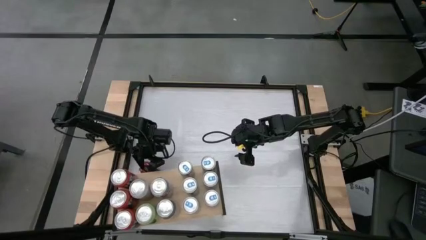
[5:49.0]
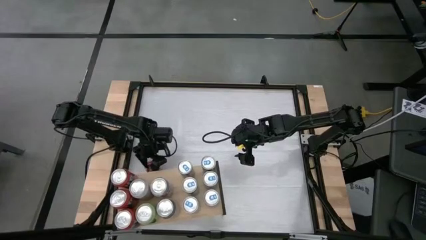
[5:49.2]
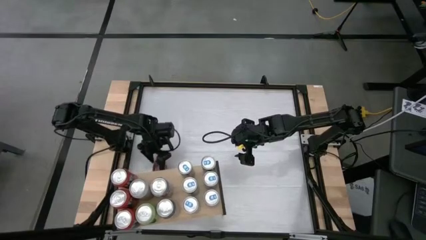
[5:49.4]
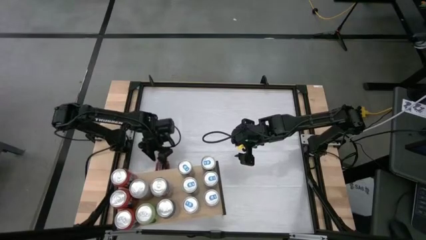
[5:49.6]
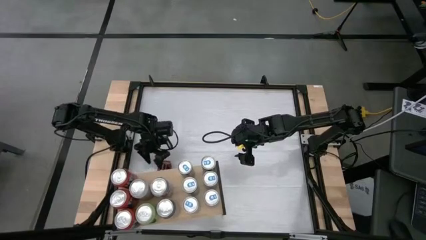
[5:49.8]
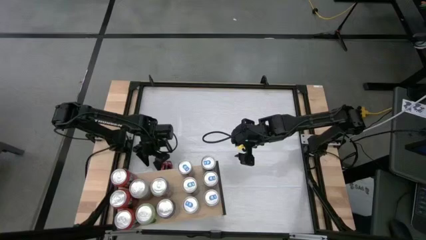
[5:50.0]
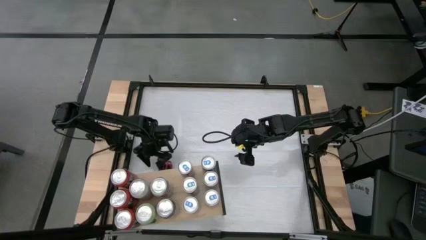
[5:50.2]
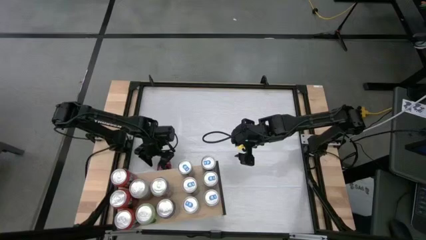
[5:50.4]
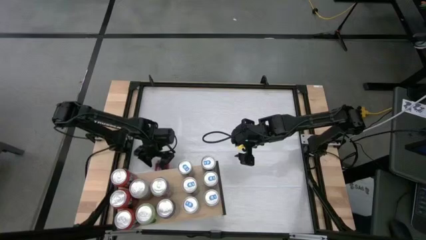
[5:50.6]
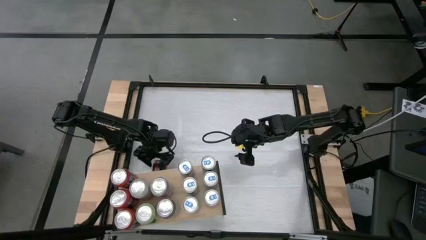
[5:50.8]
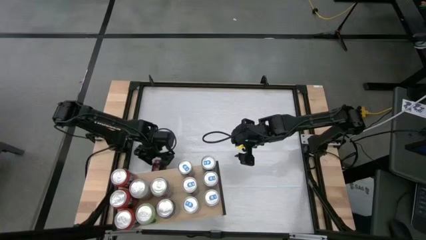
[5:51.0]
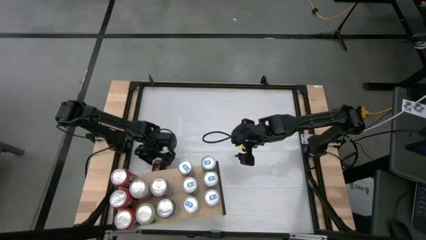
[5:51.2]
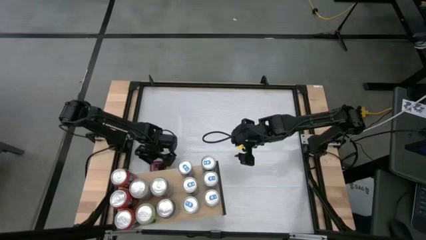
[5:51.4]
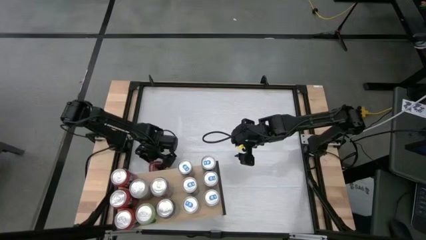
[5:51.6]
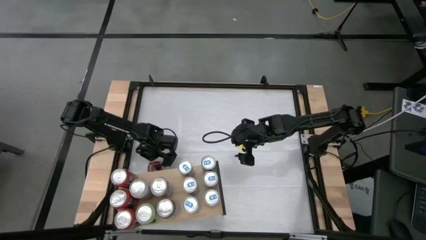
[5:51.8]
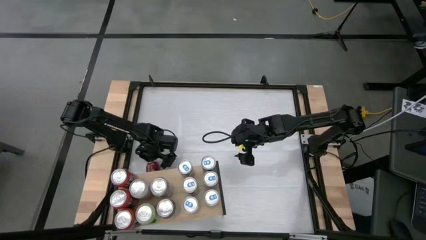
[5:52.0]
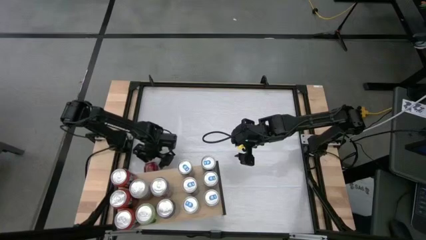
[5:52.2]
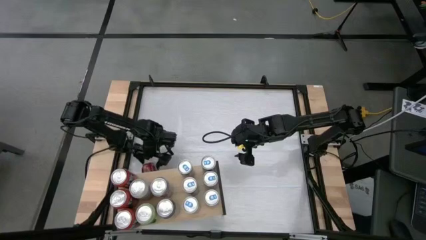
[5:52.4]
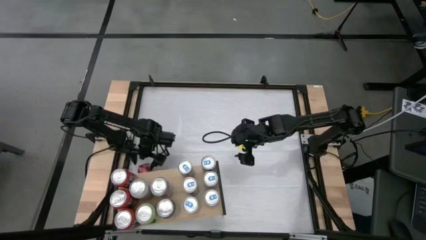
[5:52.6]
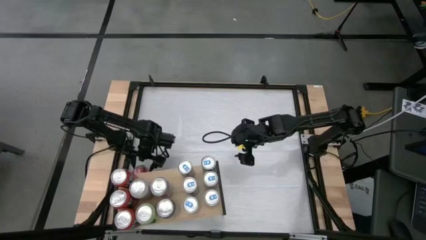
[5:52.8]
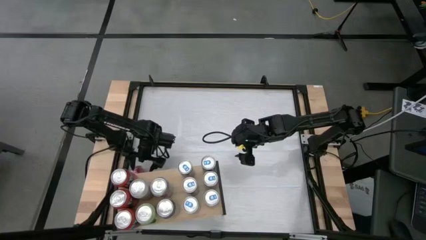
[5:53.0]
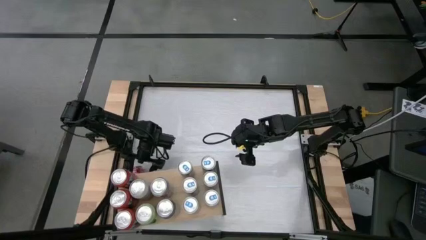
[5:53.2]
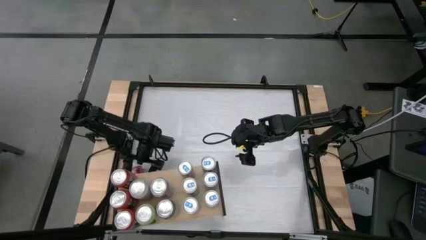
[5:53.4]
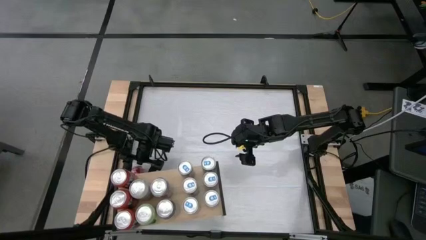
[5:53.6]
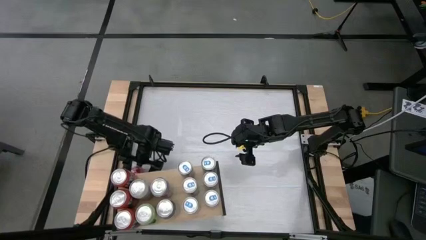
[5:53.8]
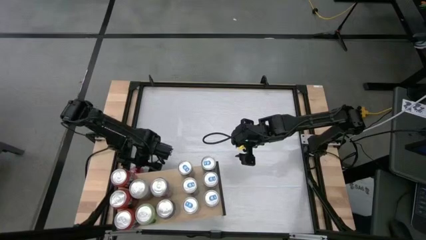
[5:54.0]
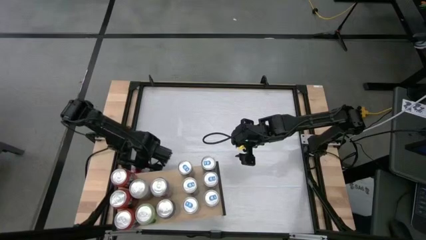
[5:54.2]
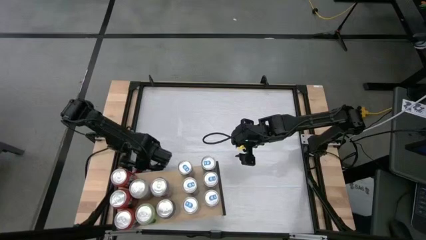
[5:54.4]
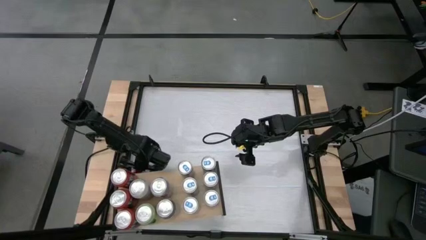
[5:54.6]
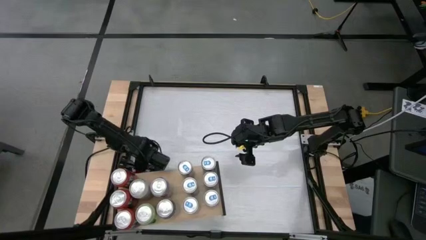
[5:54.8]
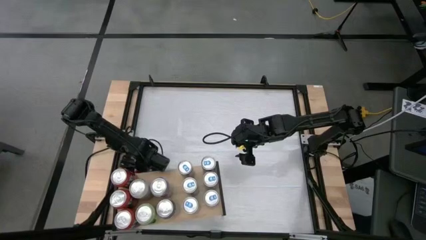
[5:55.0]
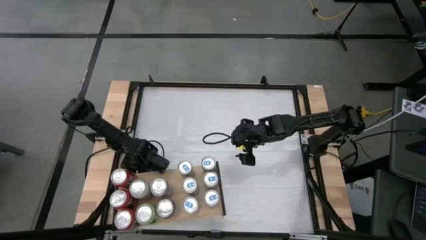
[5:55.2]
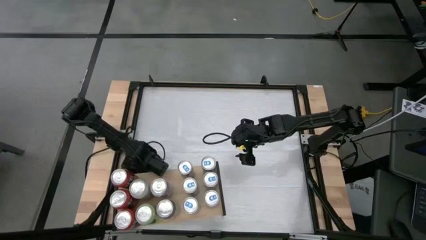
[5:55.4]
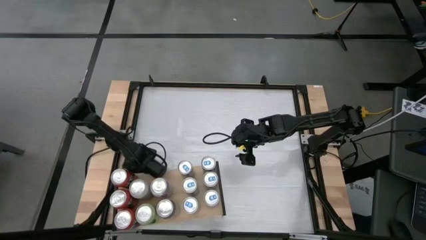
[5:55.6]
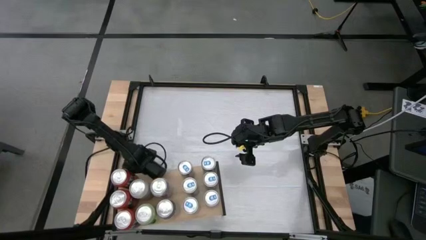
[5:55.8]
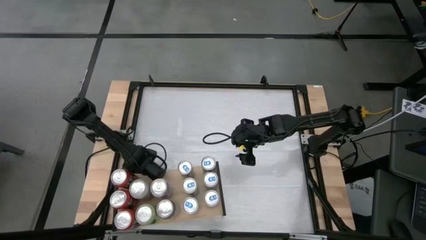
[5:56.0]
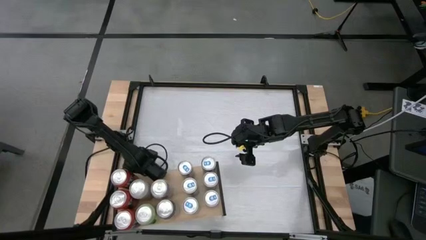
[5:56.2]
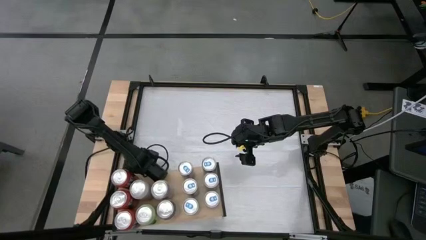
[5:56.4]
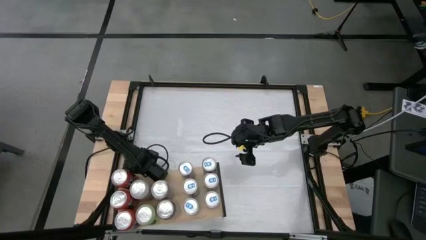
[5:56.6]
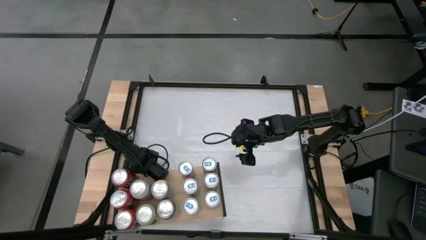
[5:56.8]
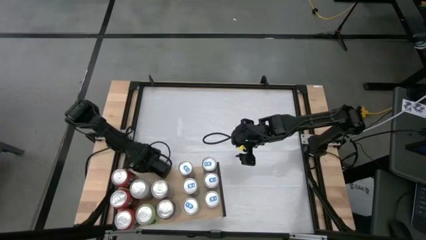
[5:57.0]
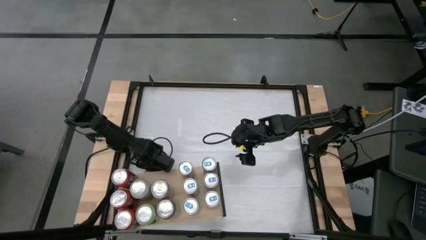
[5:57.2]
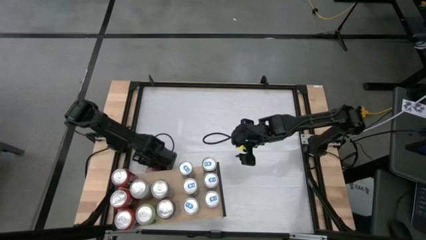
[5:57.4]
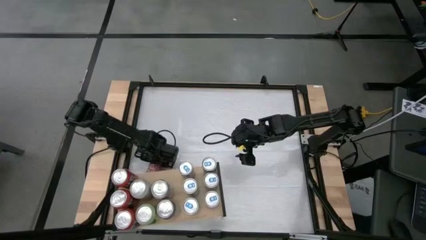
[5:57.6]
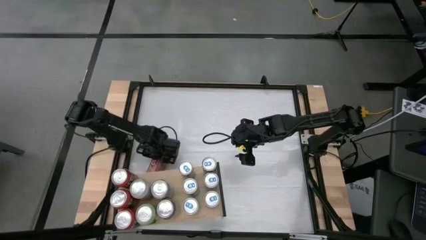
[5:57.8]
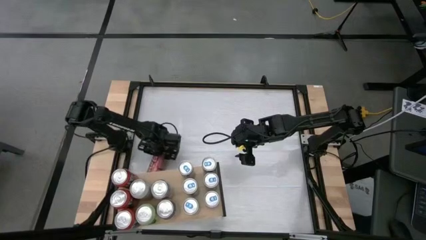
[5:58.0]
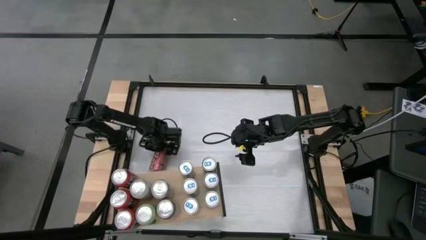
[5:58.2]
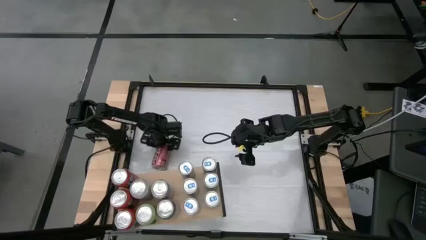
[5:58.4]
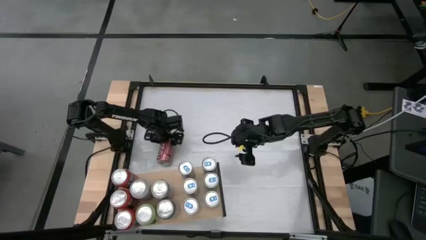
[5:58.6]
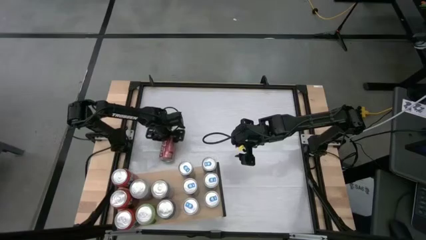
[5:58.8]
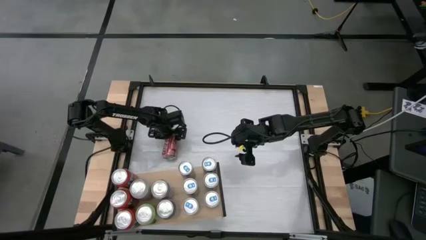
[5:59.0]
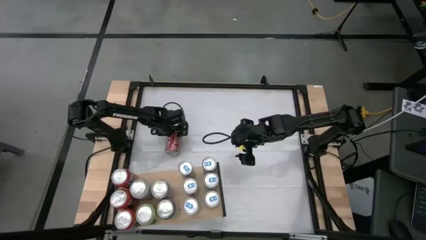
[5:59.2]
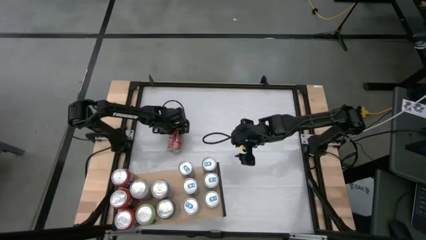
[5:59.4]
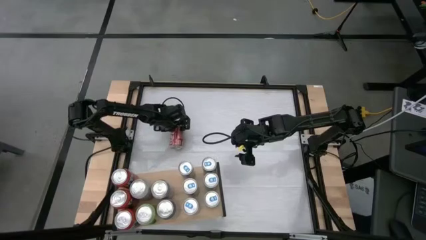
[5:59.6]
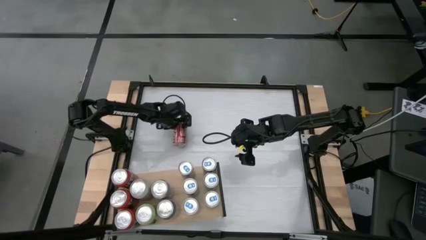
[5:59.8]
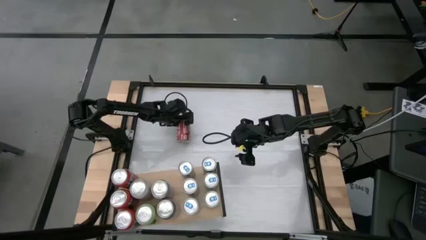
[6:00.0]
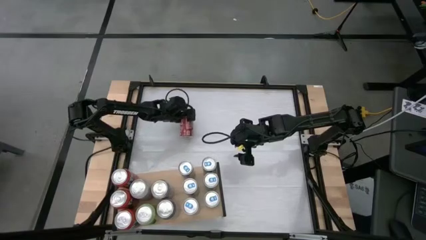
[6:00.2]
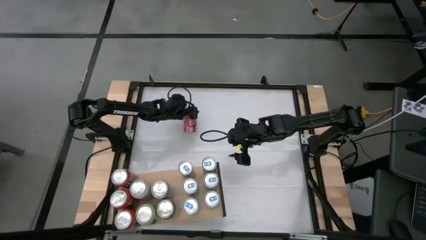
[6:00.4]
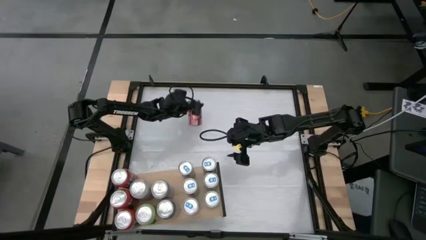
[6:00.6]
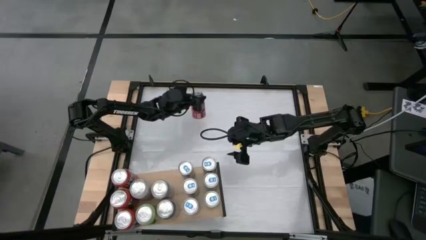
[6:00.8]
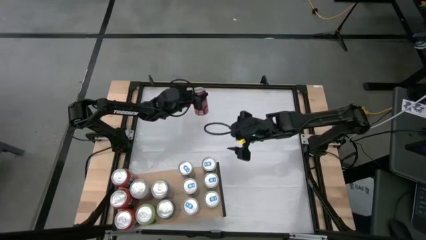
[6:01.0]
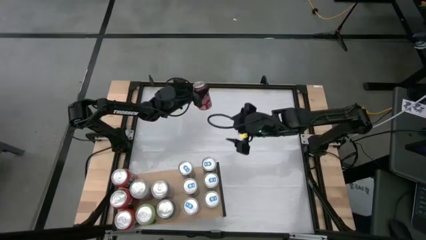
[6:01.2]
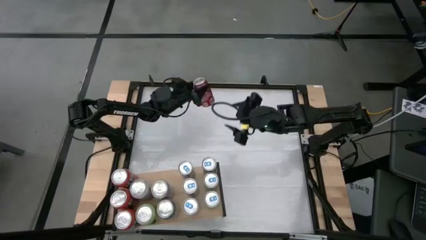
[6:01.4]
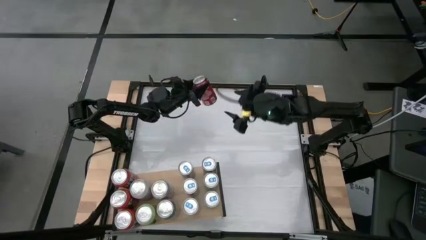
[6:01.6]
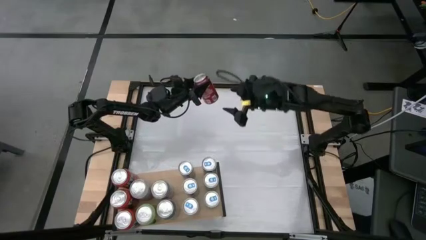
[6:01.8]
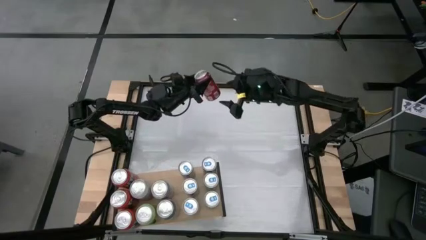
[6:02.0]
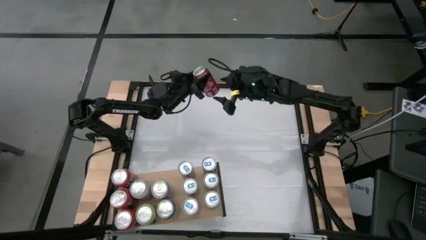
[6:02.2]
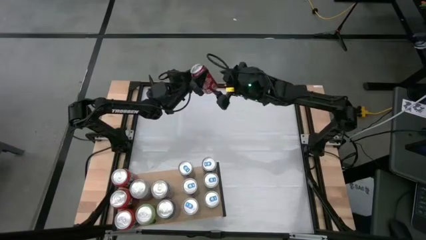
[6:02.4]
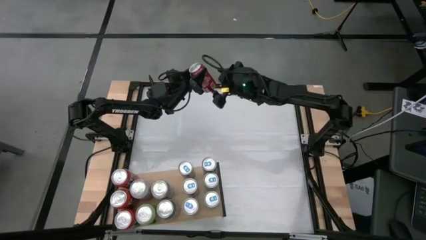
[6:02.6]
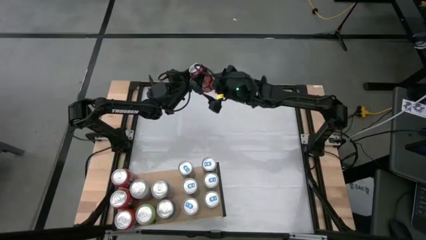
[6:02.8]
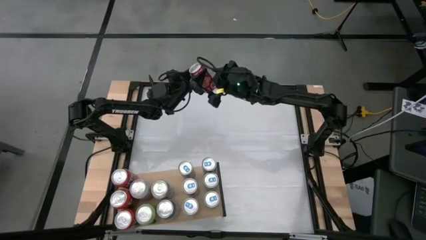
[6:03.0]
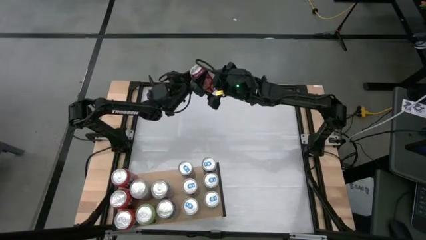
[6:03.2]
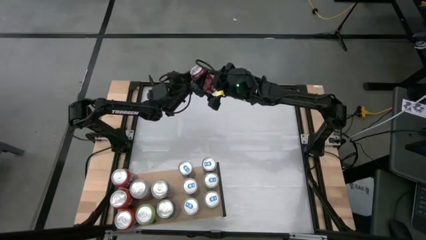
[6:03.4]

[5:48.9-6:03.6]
Task: Place canned beverage on shelf
Put the red soda can on the shelf aligned with the silver soda cans

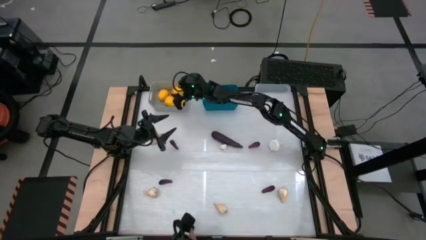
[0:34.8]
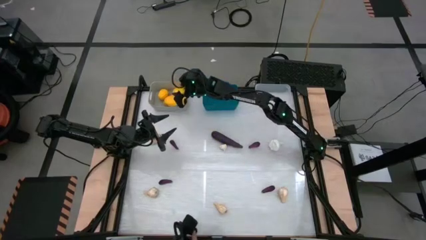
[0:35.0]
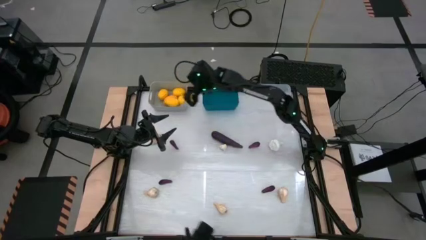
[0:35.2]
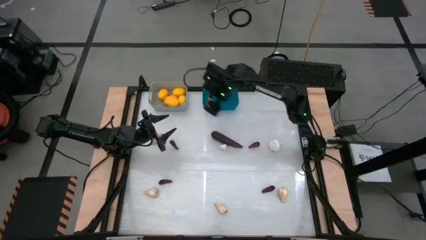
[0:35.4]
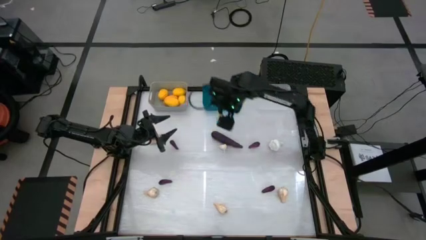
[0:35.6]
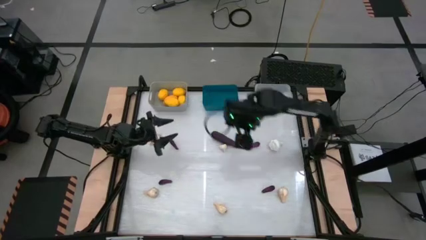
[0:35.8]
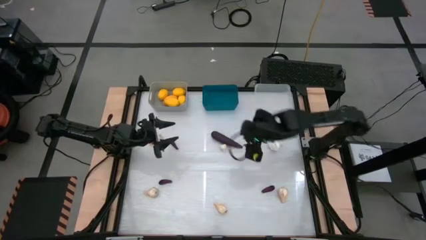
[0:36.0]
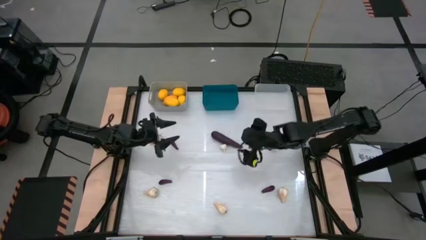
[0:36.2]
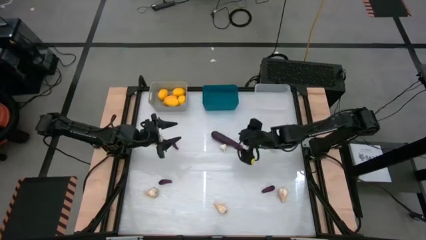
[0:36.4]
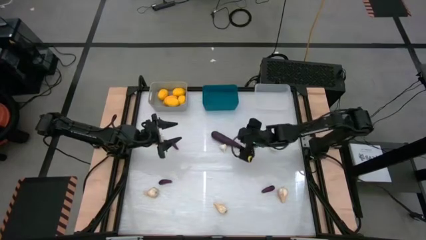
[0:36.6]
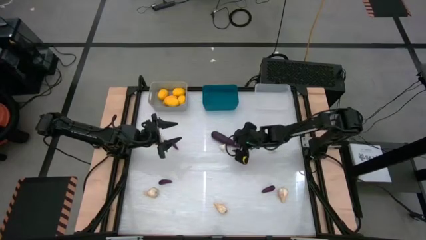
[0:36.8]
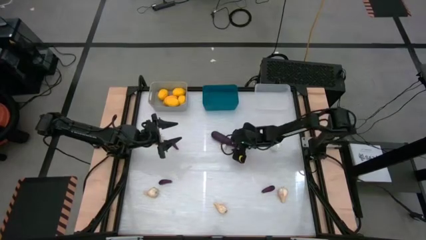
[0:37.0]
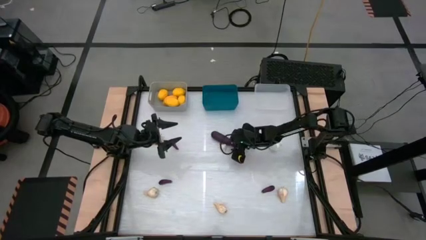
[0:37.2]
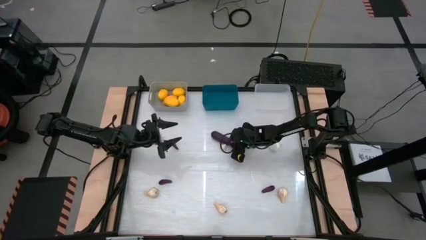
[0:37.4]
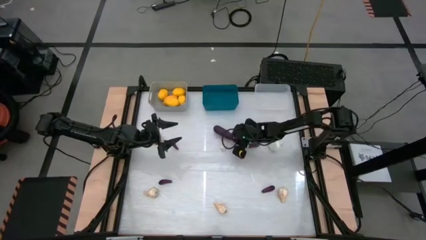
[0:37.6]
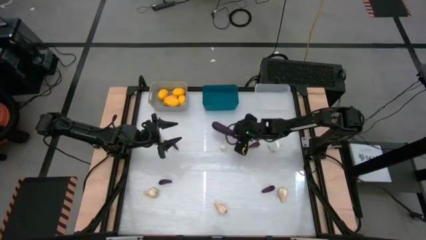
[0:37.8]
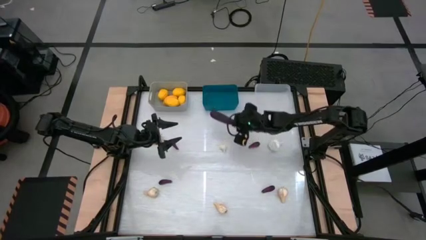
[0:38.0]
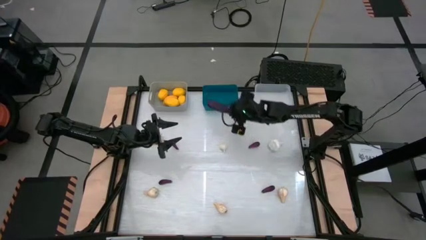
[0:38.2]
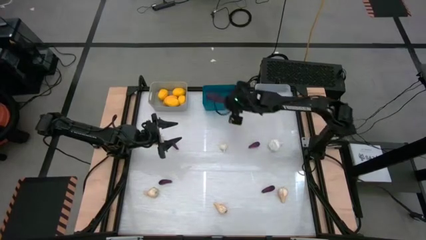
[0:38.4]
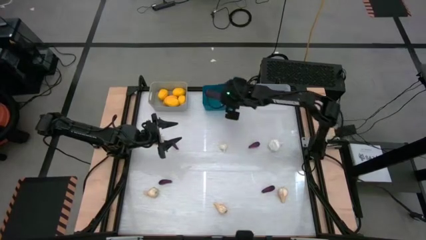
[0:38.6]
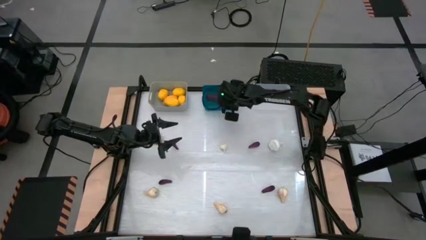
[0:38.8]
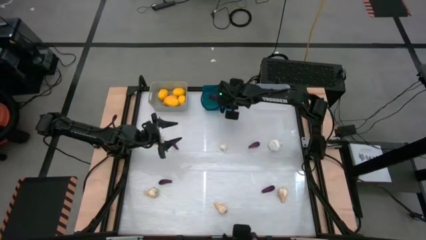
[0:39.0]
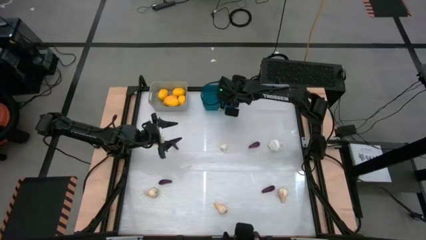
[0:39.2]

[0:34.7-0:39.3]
Task: Sort produce into baskets
Put the middle top eggplant into the blue bin
